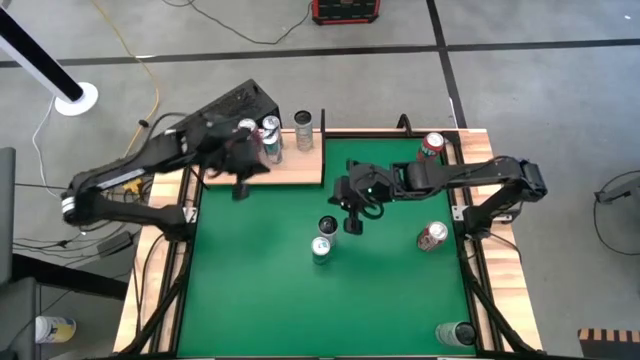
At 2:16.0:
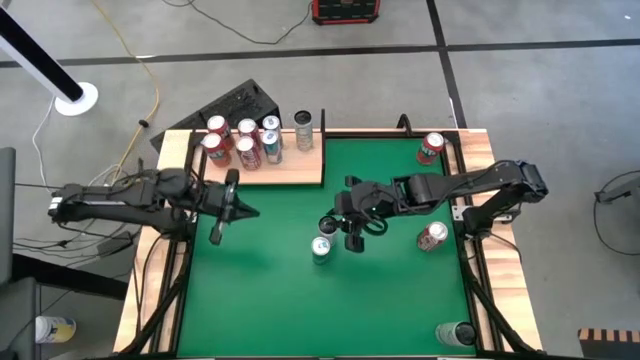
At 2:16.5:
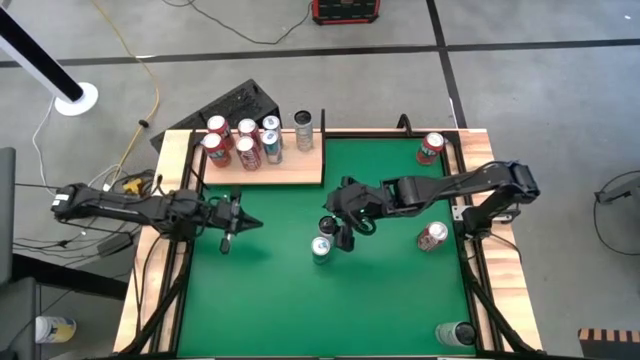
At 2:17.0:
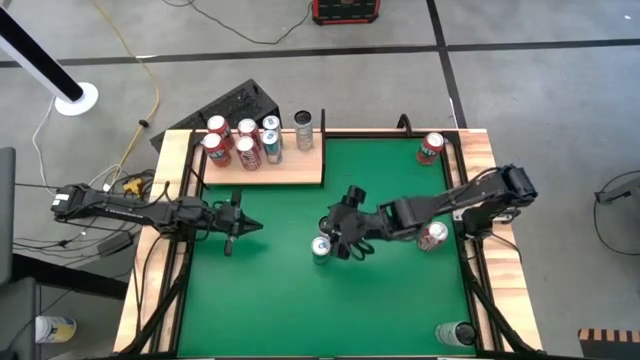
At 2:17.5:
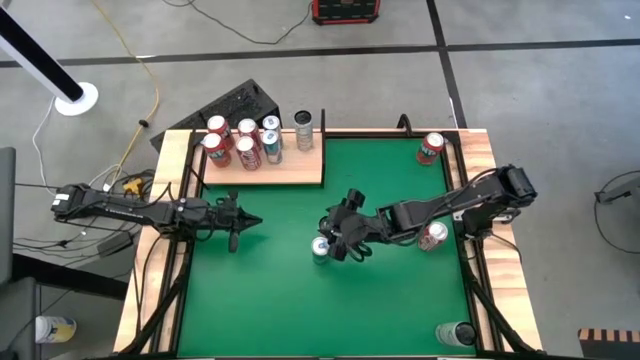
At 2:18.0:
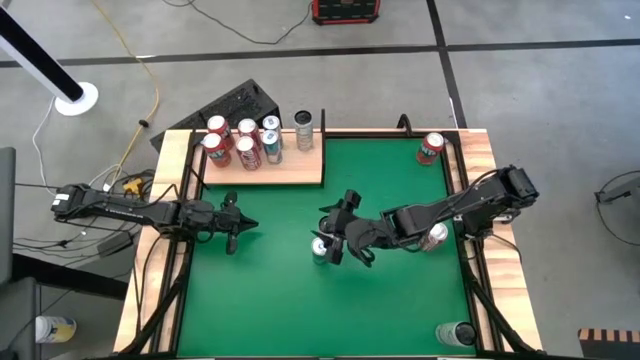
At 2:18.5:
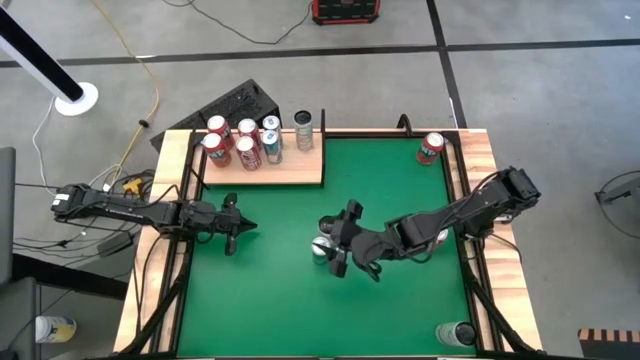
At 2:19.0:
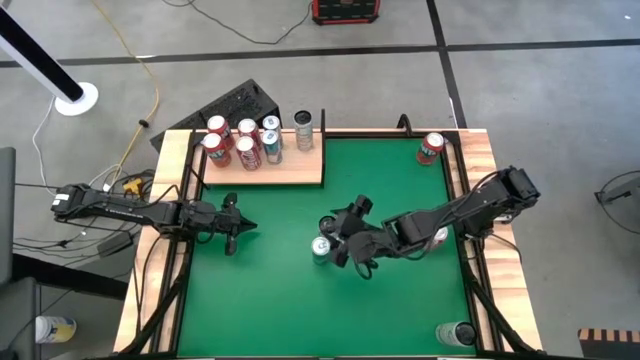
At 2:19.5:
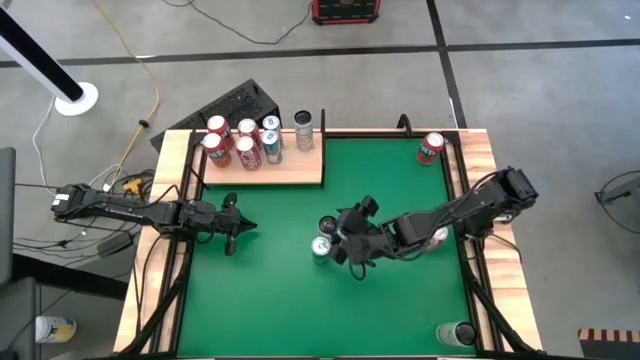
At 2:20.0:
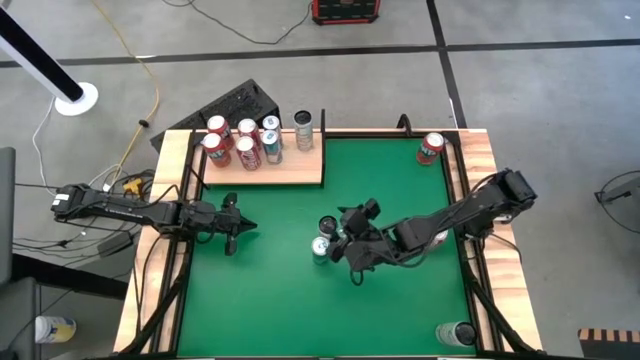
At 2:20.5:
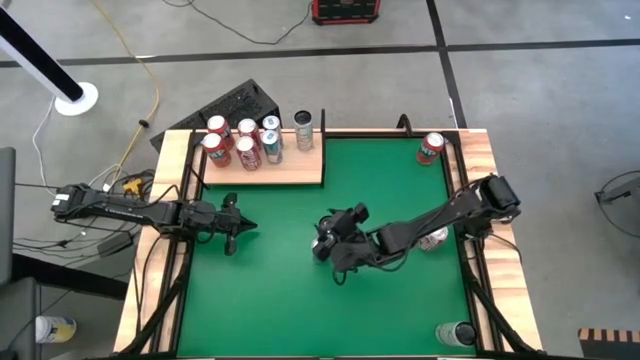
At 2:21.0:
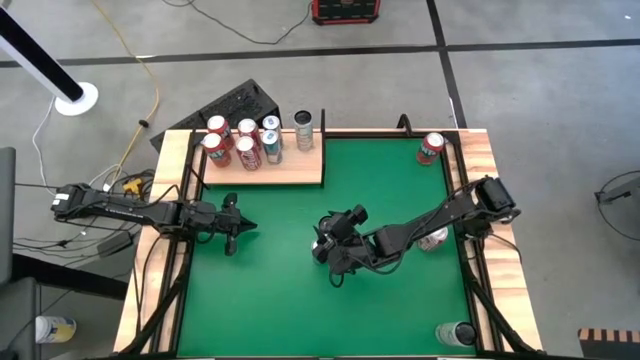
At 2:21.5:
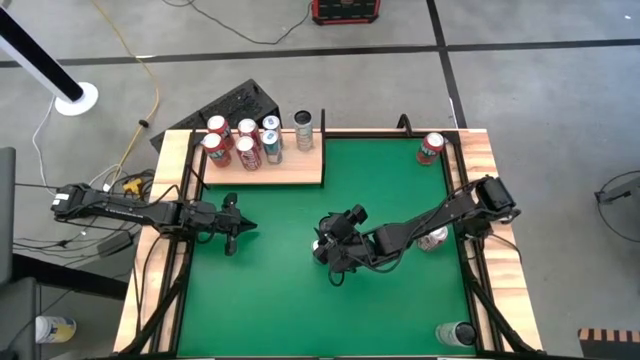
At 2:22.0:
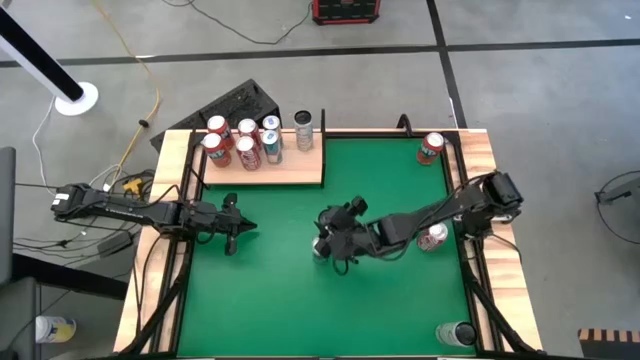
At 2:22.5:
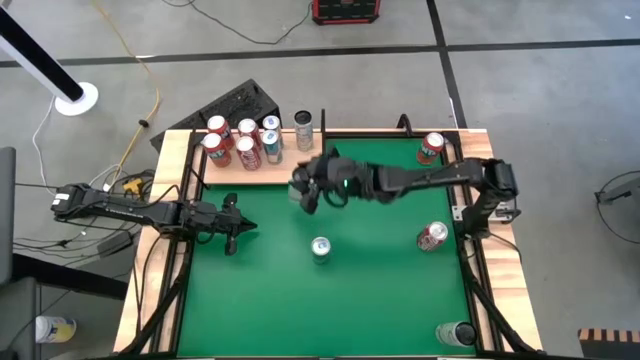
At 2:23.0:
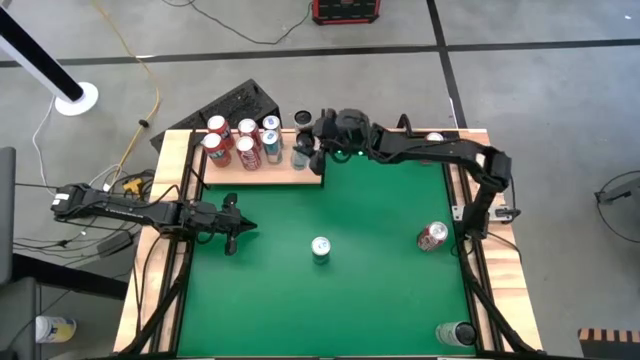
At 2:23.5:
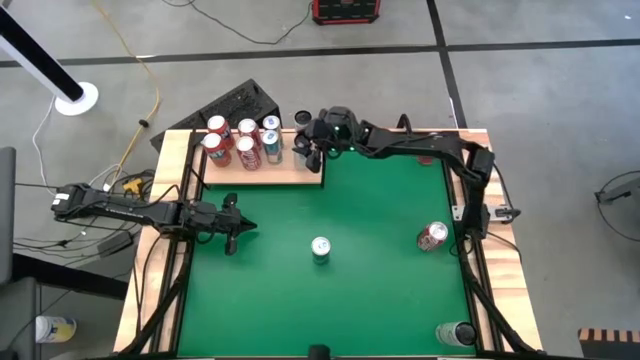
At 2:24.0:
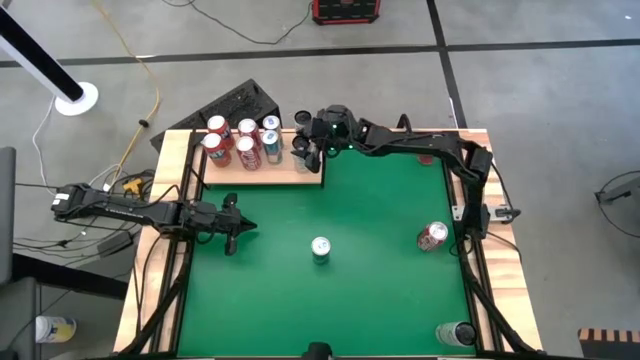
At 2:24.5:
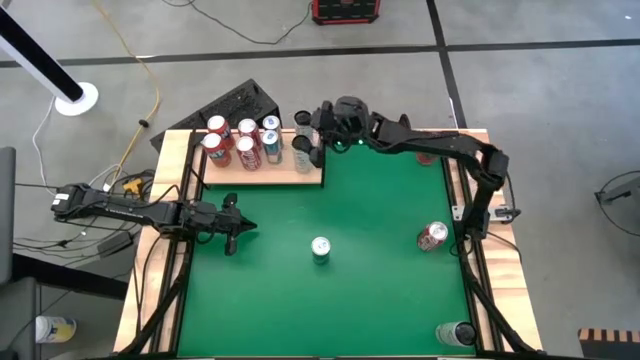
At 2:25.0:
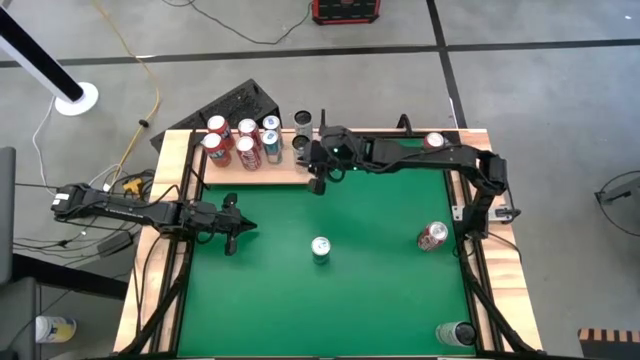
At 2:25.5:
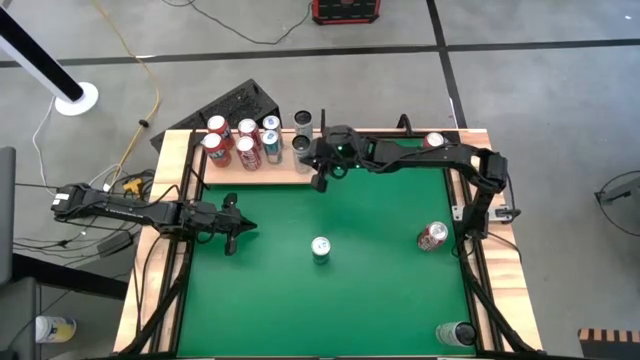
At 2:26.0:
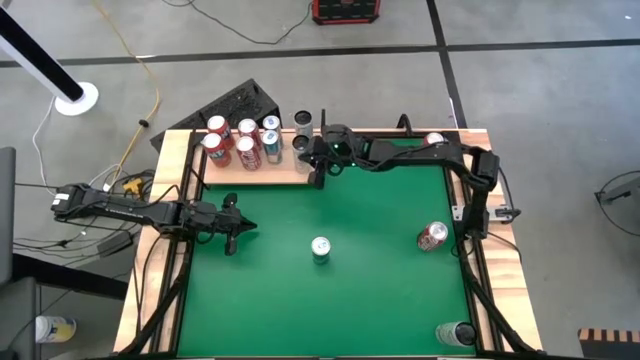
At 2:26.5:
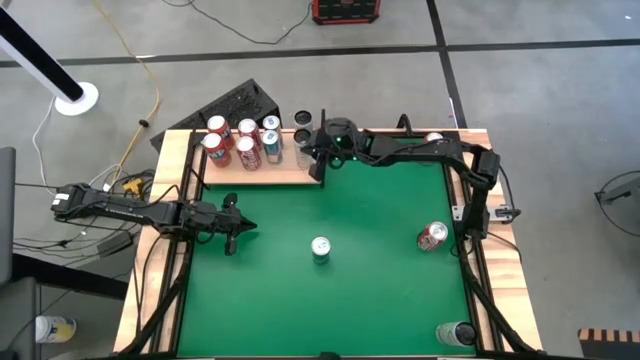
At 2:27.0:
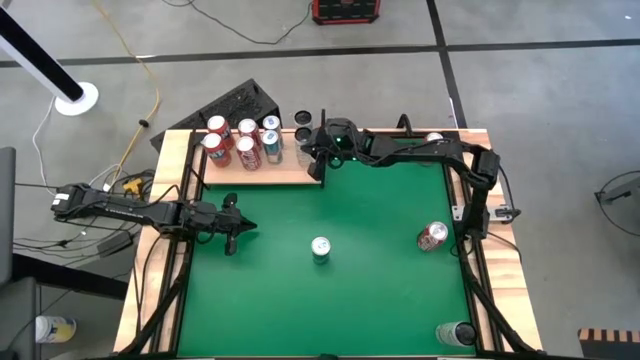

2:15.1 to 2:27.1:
Task: Place canned beverage on shelf
Put the top white and yellow soda can on the shelf aligned with the other white and yellow soda can

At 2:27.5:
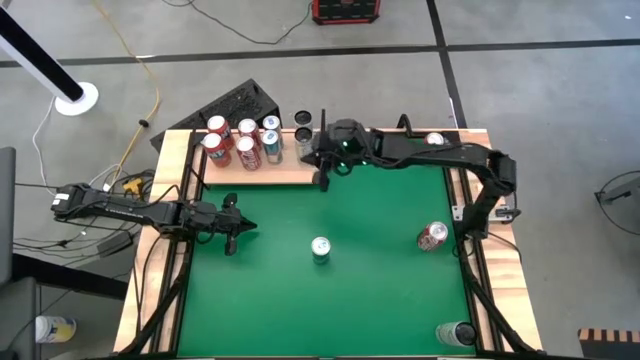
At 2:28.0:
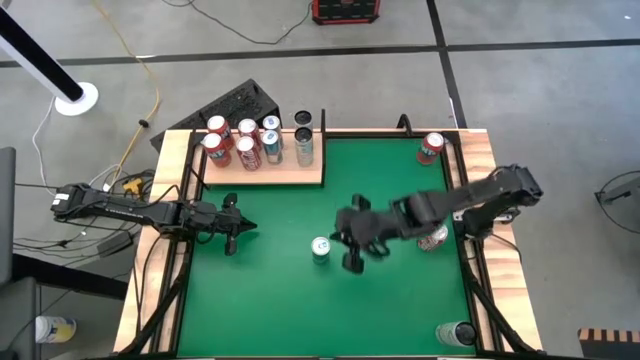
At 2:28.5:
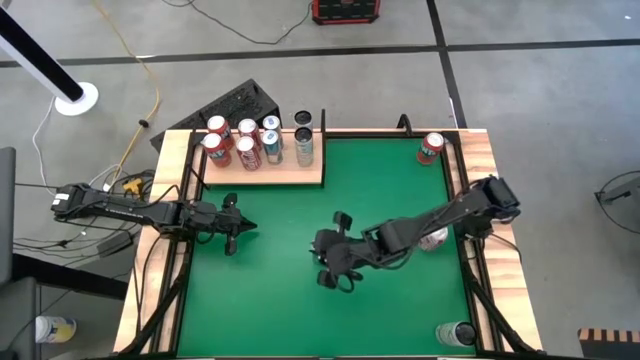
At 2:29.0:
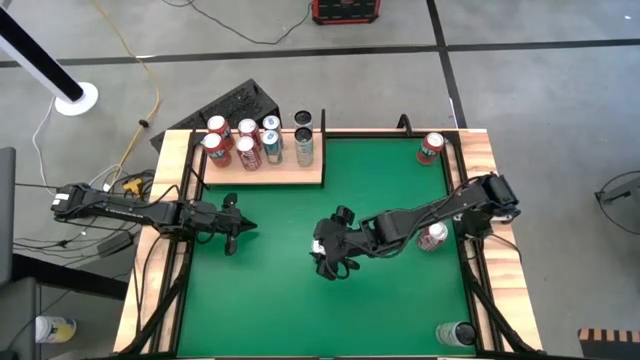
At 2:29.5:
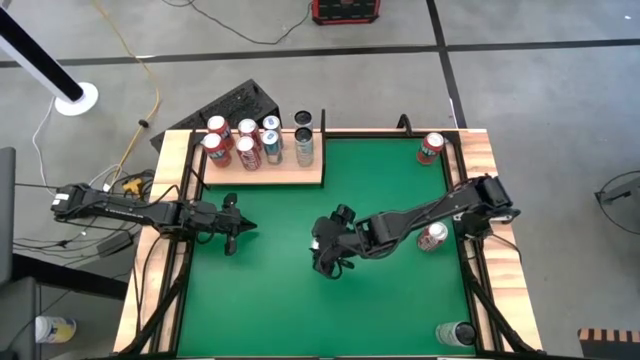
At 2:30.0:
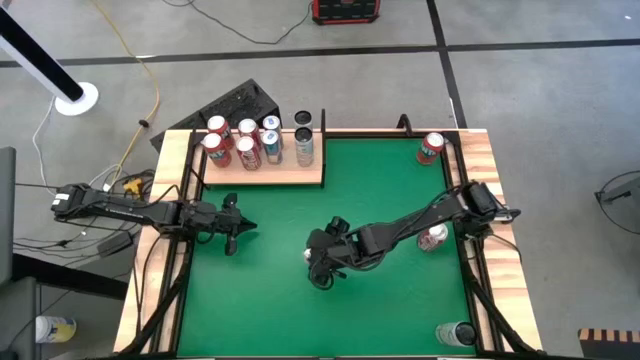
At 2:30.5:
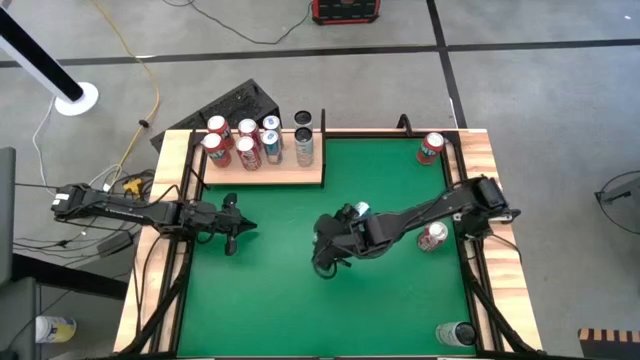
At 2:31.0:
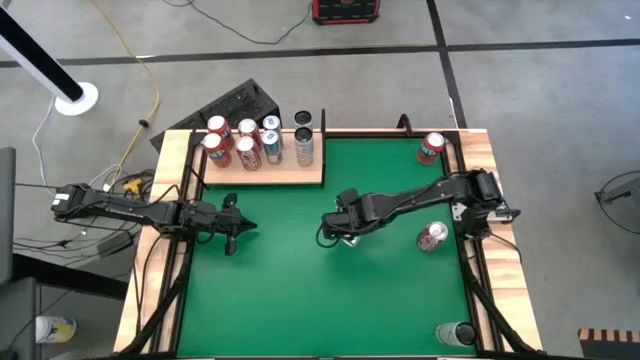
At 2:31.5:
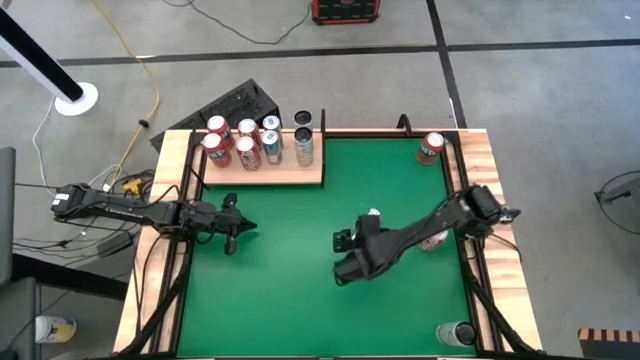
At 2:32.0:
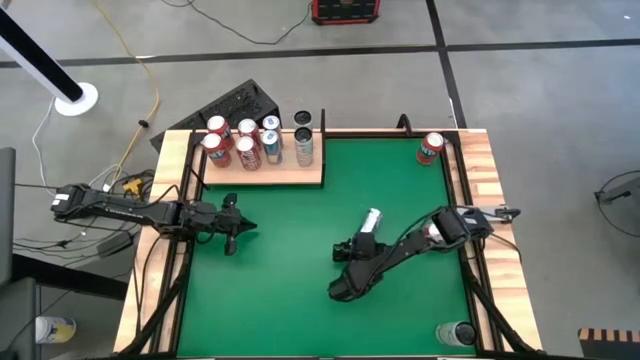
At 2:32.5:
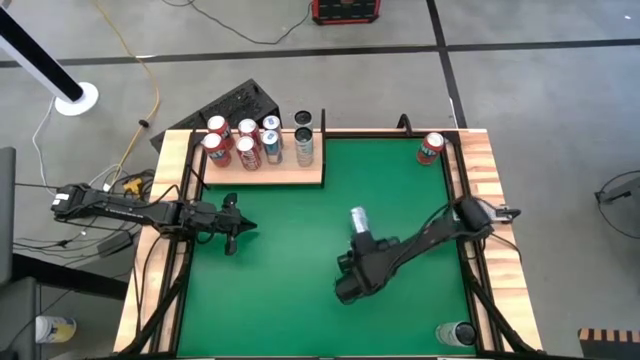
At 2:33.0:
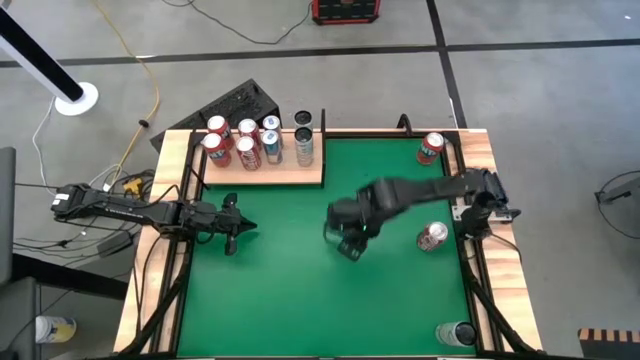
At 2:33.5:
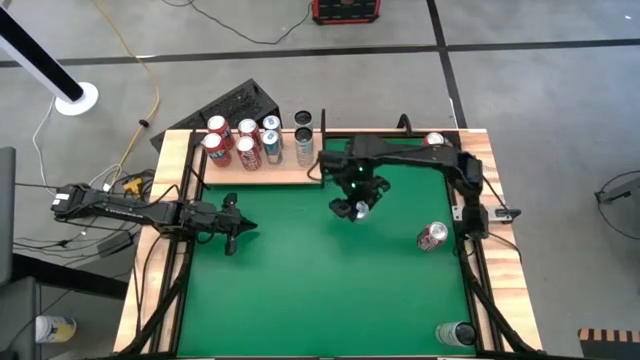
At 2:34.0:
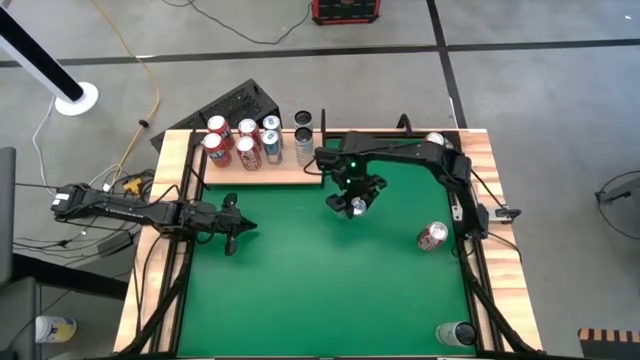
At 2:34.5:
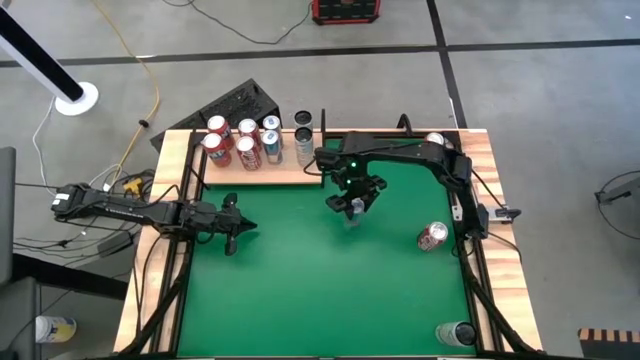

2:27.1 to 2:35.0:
Put the white and yellow soda can on the shelf aligned with the other white and yellow soda cans

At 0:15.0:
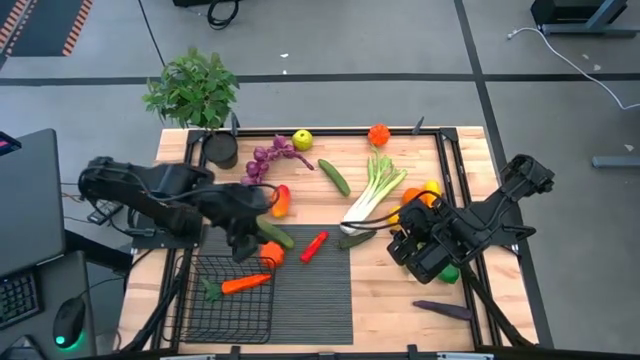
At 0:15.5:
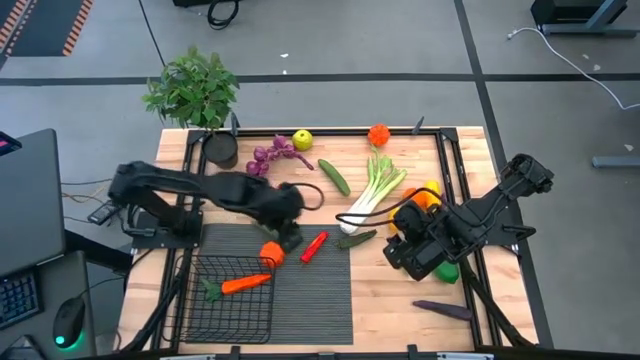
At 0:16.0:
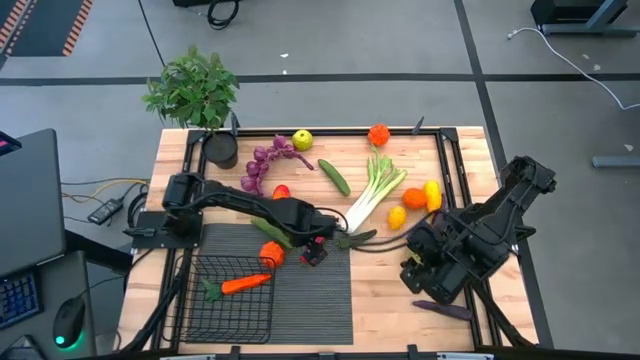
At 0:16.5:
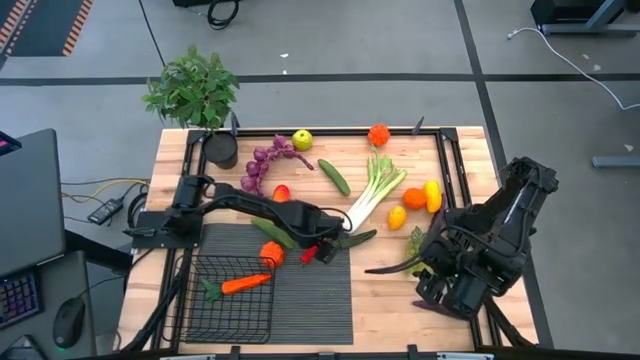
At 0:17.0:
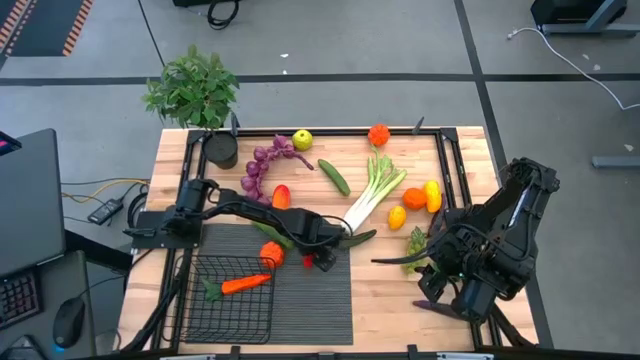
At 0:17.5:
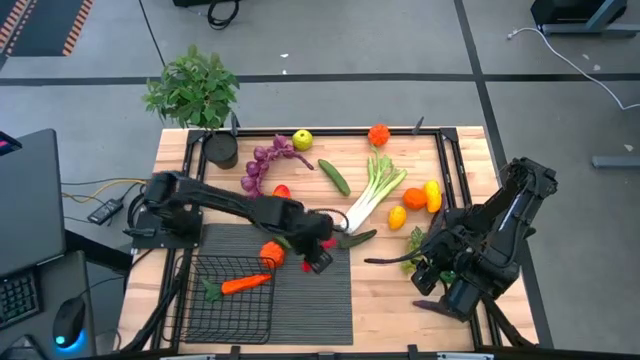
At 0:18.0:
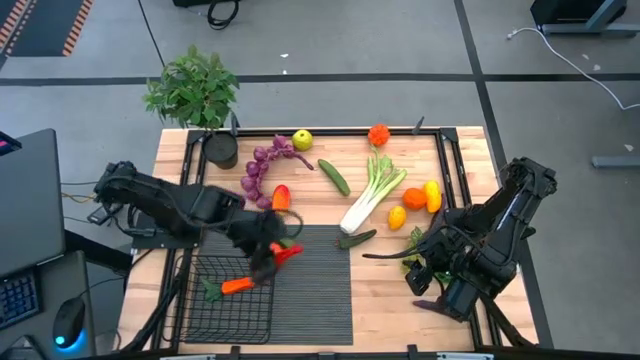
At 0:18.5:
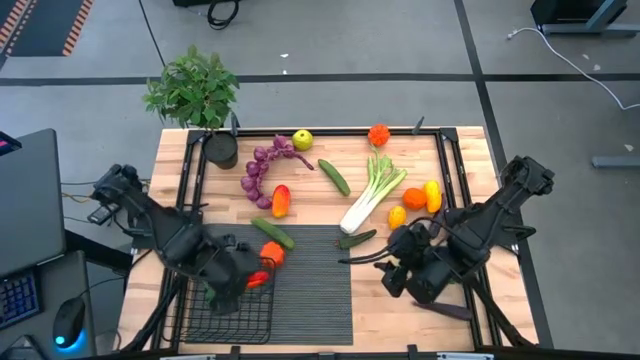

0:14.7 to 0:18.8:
Task: Build produce basket
Put the red chili pepper into the wire basket
